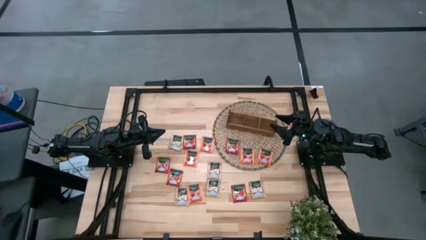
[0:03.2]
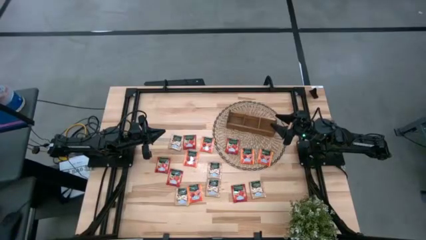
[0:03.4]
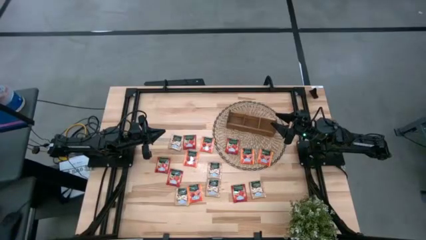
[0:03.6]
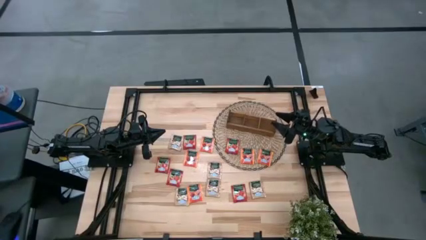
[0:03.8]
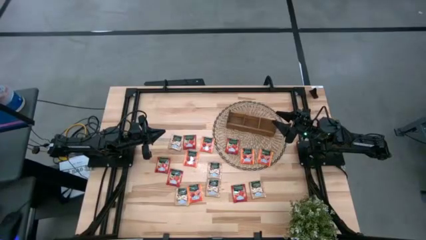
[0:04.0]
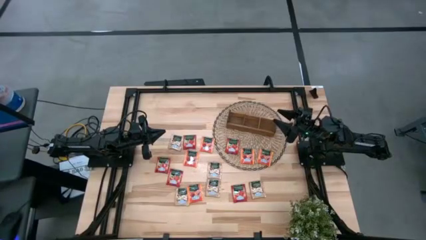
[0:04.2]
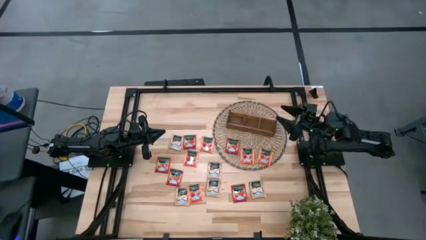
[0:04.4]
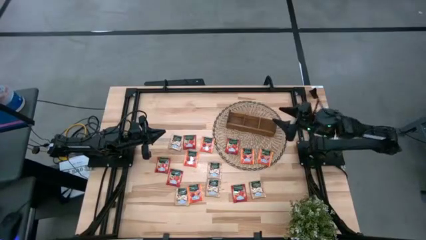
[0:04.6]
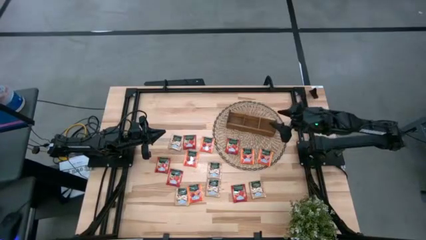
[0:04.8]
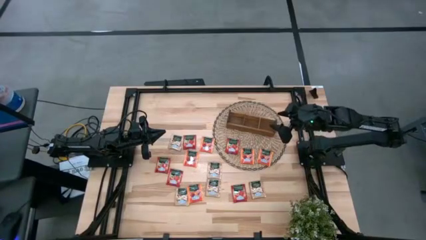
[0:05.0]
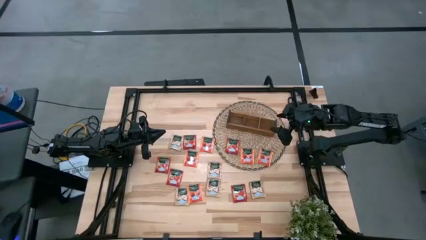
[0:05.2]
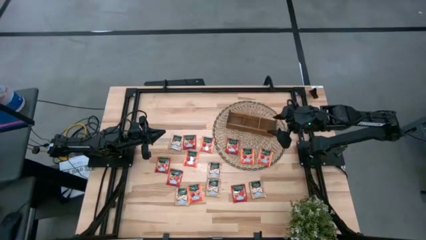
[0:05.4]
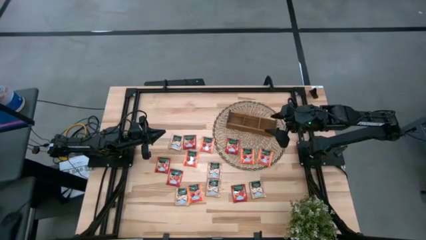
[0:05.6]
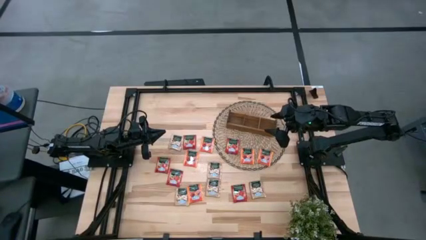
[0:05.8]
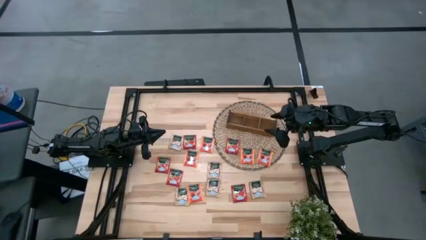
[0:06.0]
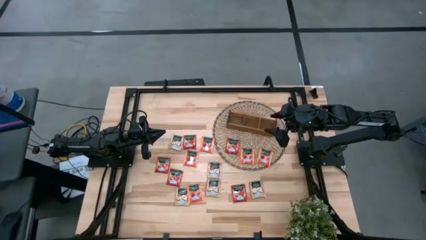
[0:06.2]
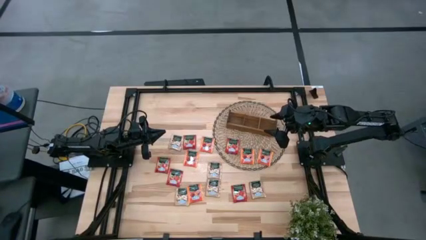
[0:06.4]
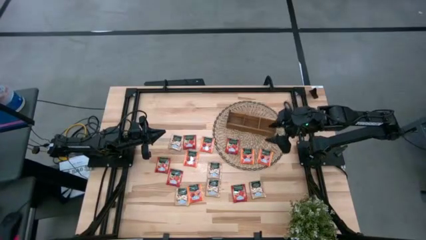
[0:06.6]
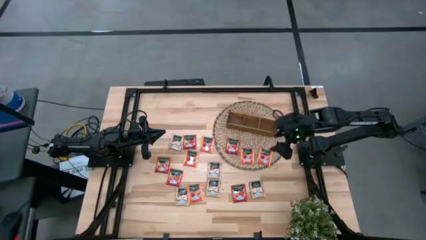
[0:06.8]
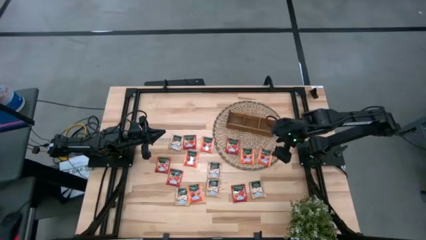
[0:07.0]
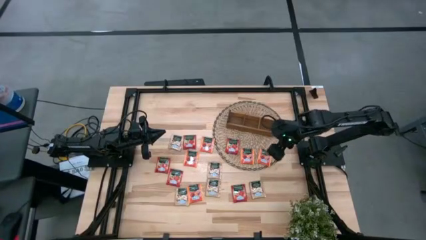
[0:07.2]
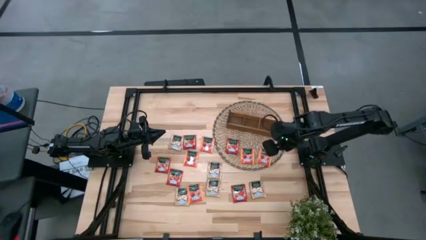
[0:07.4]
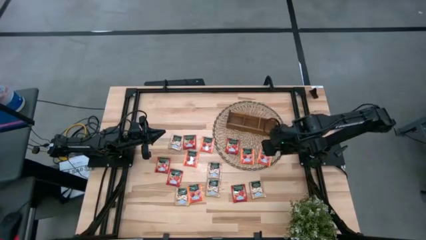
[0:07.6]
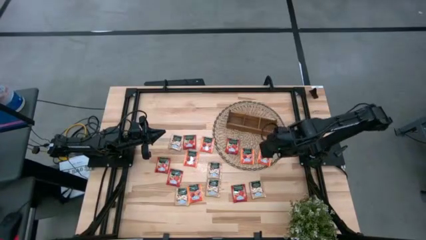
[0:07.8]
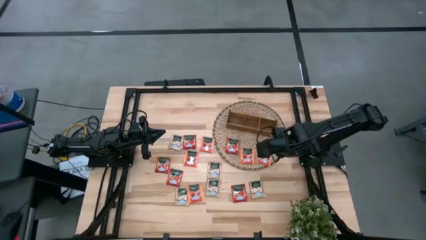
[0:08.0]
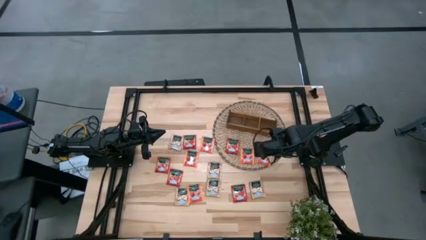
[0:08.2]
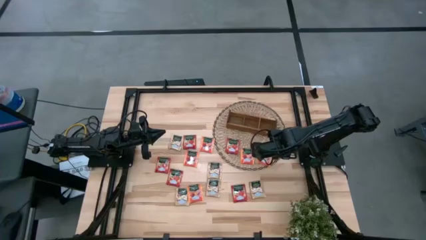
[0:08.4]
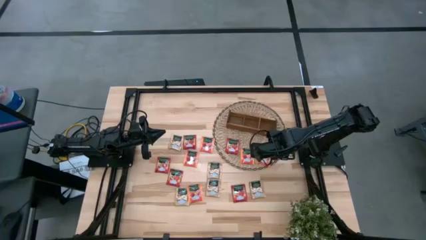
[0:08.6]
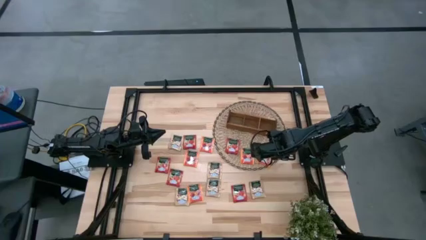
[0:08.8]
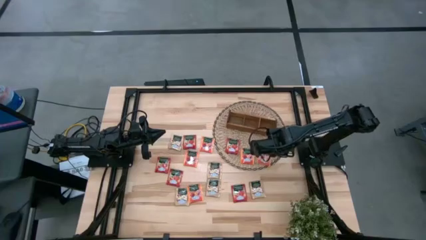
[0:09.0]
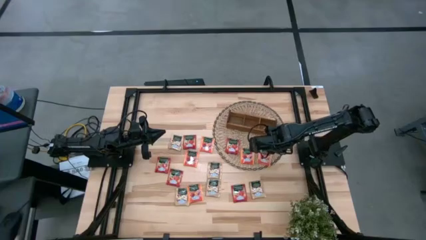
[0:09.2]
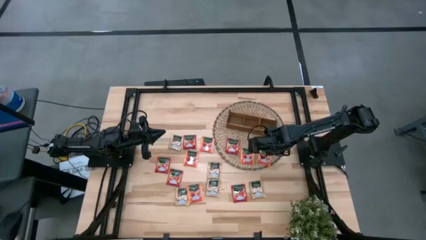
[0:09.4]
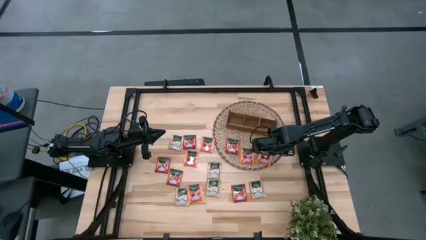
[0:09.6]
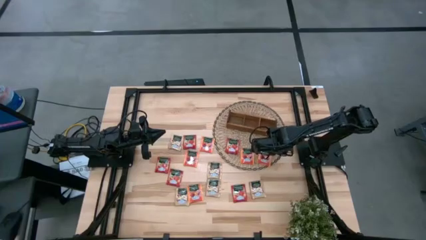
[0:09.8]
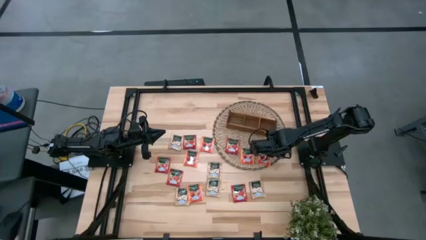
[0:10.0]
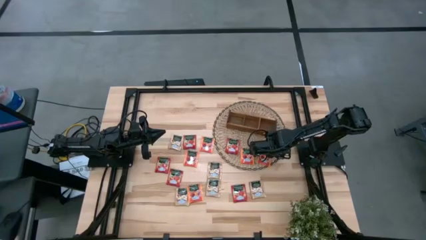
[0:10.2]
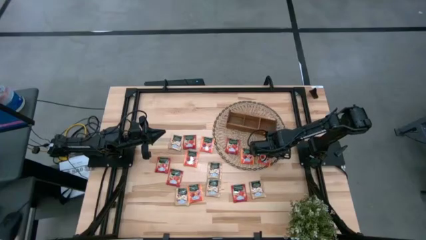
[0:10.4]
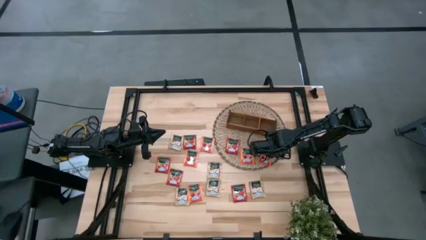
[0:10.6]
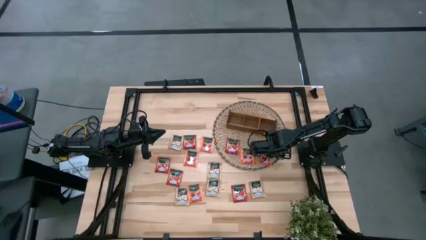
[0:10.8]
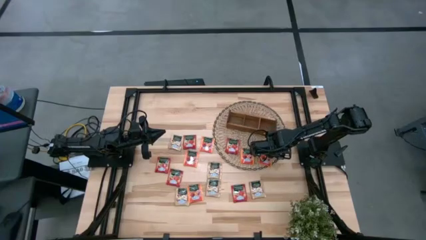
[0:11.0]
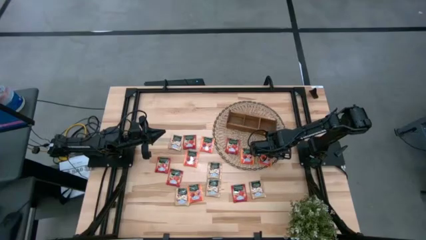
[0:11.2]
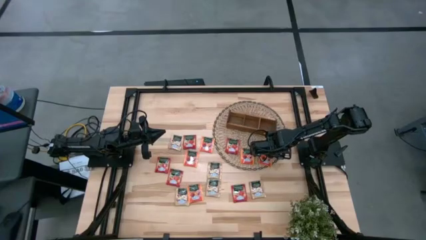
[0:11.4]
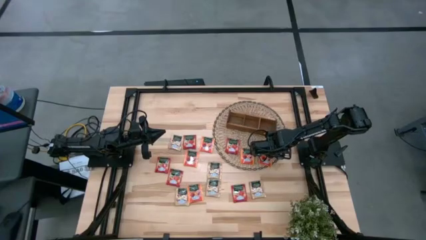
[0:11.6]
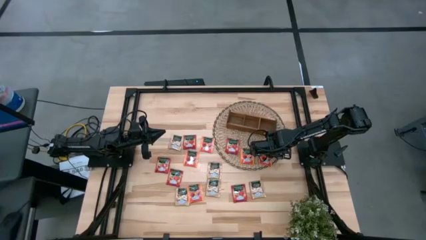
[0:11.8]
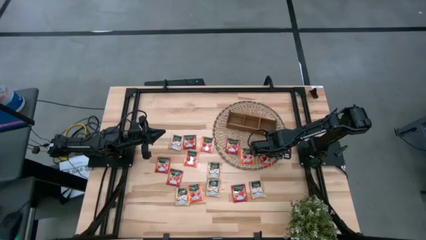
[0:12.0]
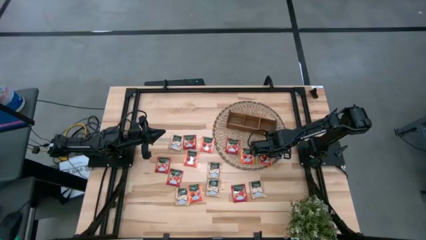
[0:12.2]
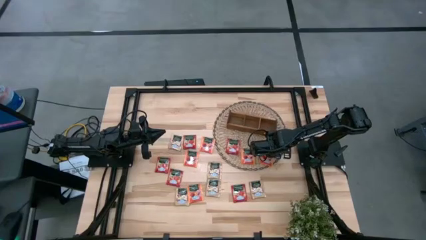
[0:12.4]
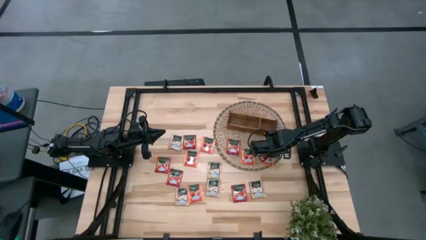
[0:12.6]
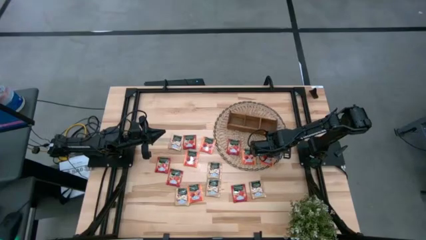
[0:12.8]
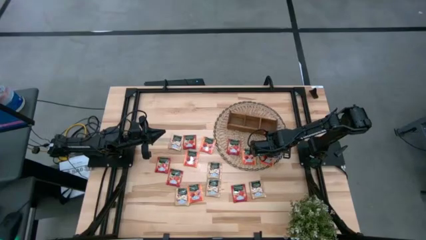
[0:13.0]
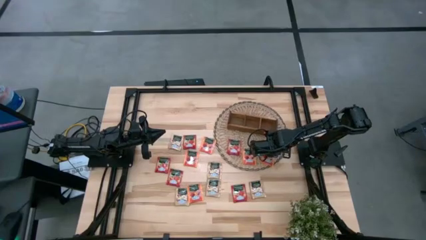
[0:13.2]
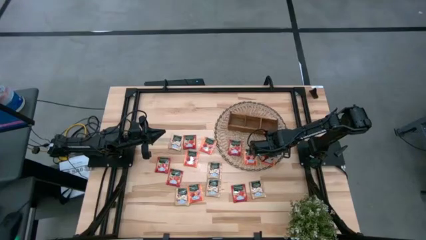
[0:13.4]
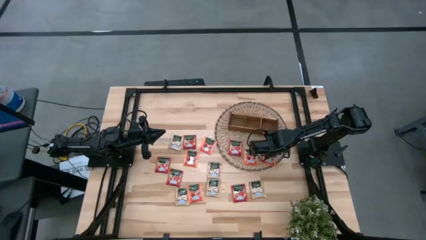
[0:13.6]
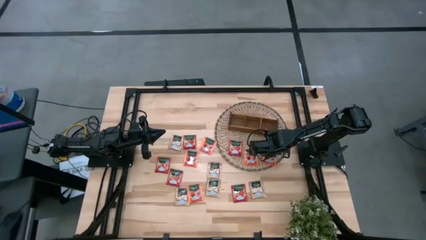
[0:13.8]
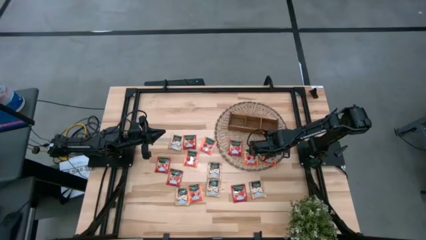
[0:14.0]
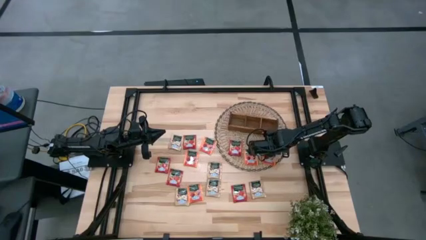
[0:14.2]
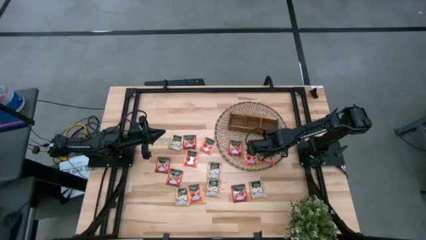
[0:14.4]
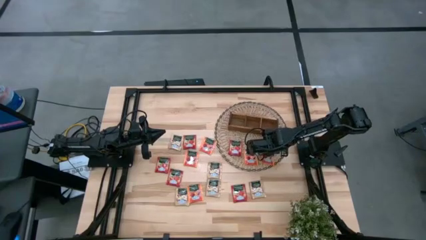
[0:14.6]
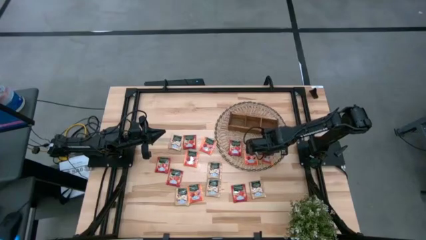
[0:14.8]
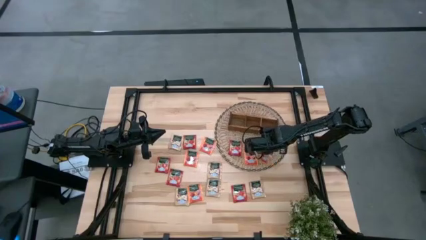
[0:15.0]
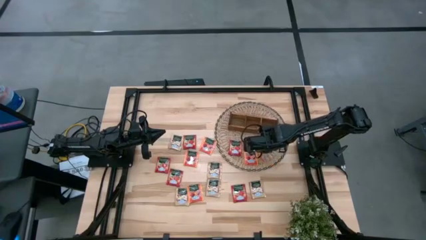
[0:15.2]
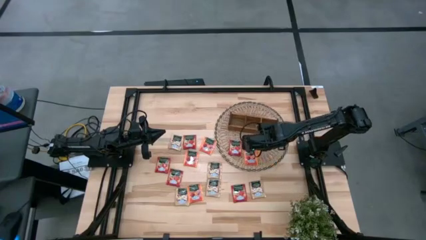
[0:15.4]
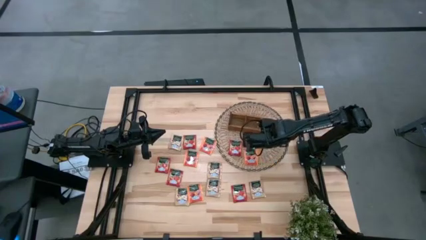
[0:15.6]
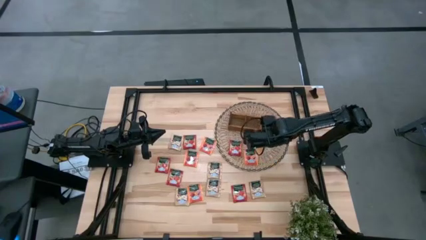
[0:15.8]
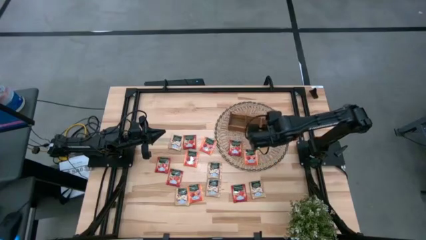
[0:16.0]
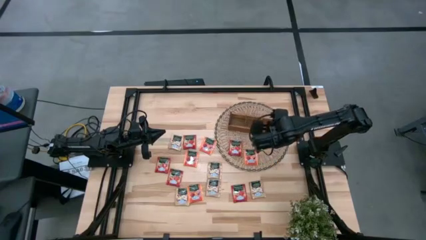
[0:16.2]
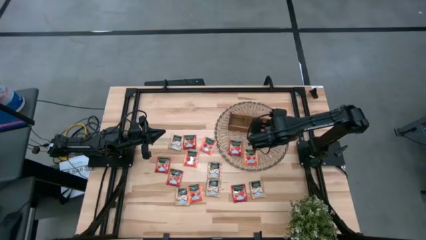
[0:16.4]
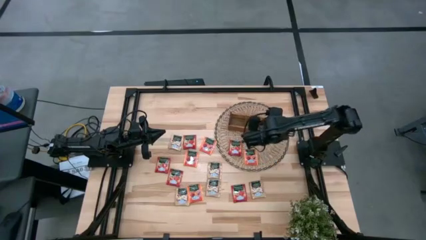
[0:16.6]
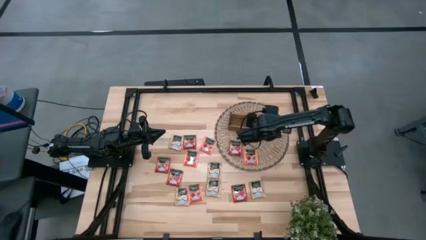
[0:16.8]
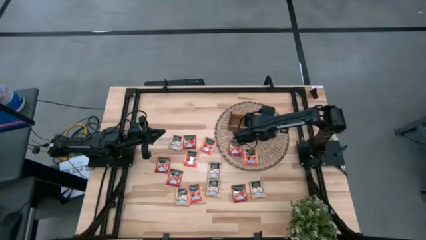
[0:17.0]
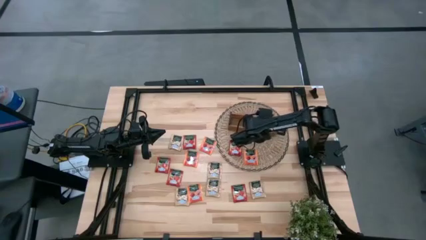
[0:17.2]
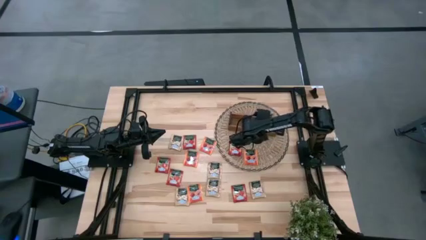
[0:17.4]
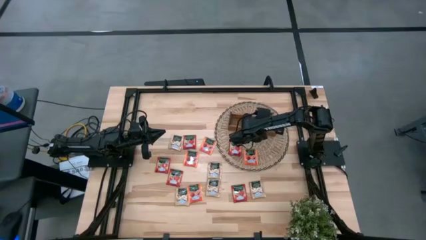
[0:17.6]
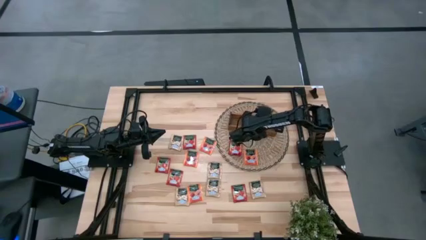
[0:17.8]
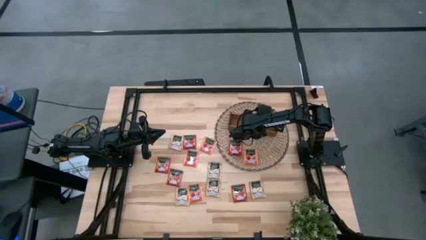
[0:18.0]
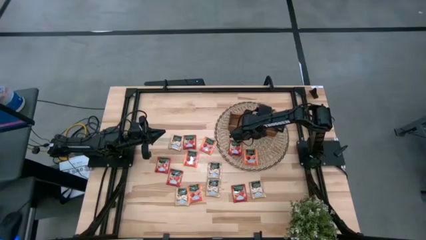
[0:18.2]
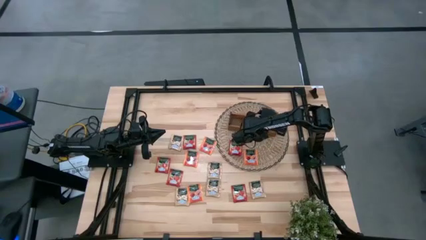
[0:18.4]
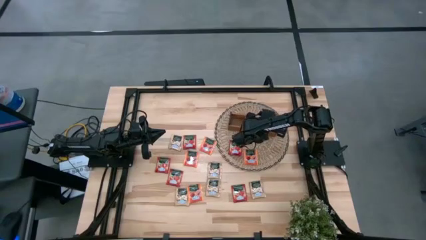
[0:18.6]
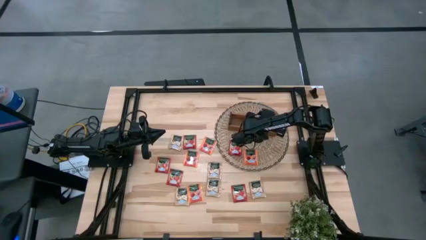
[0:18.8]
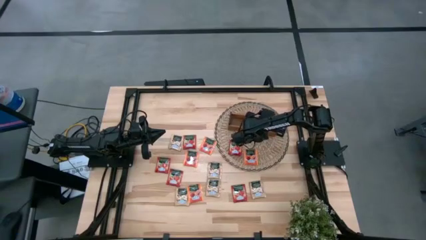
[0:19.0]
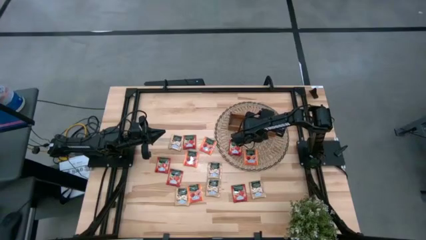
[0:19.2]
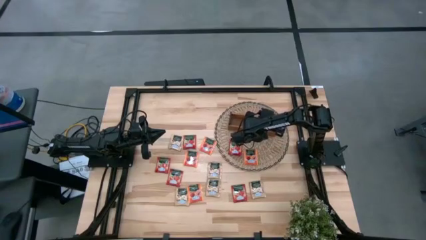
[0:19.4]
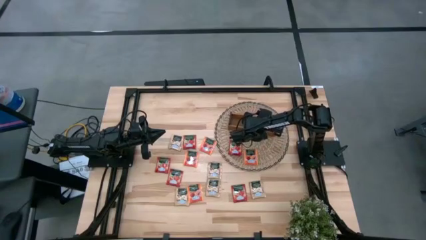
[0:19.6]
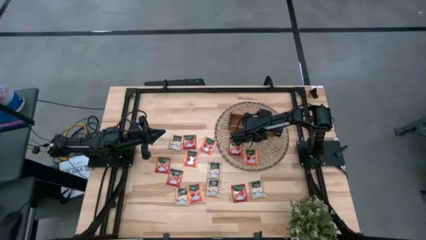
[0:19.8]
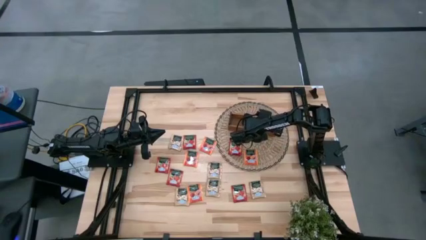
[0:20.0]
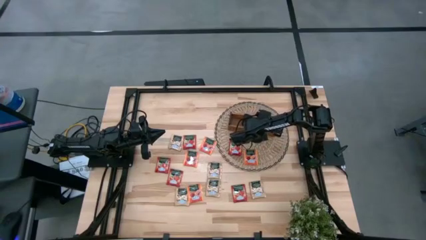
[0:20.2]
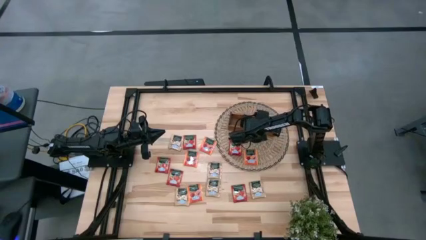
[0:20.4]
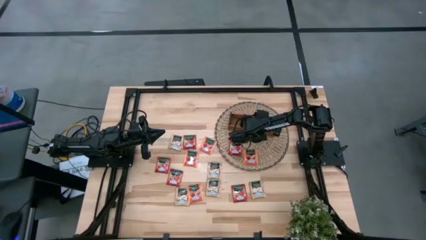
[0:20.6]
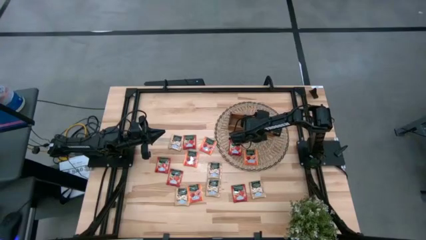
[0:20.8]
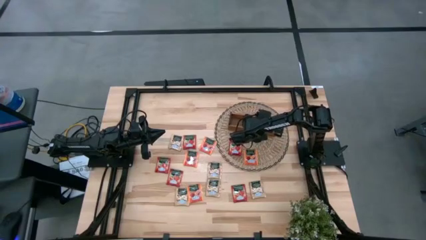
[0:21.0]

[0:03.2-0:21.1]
Task: Pick & Place Tea
Put the orange tea pack into the right compartment of the brown organizer
